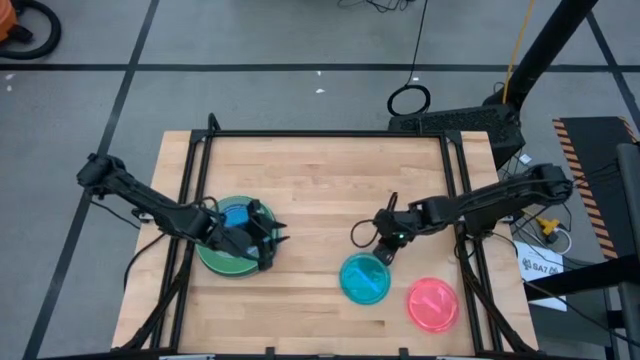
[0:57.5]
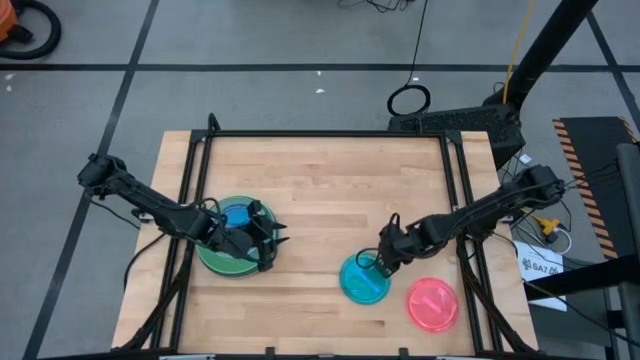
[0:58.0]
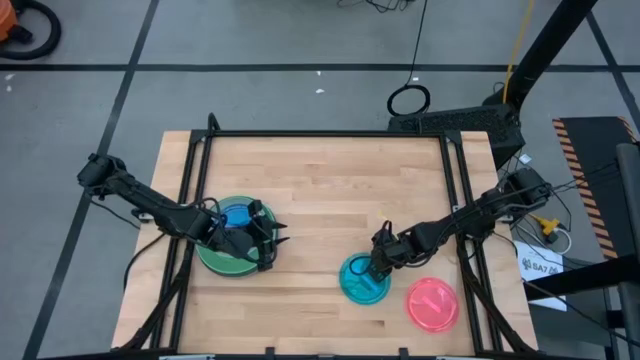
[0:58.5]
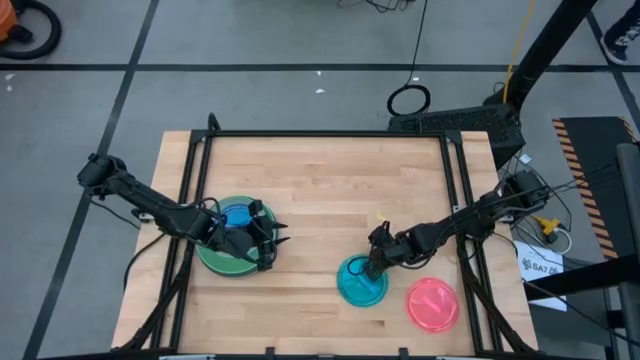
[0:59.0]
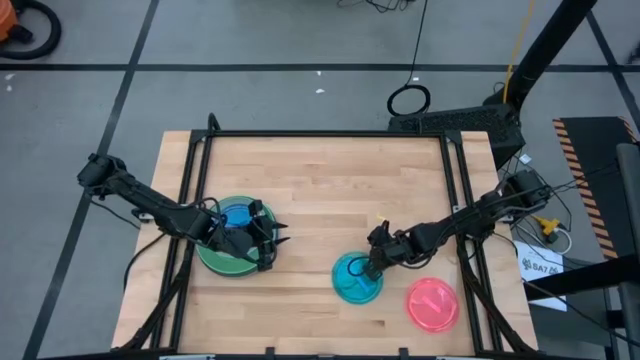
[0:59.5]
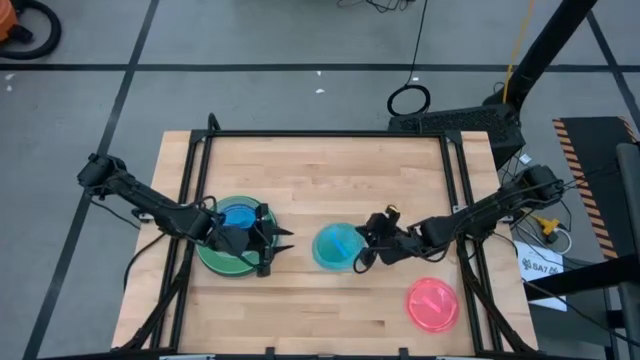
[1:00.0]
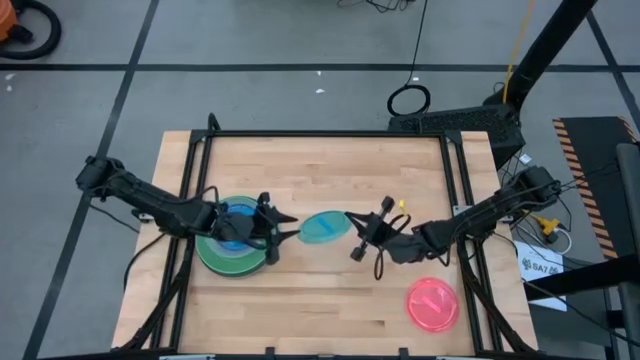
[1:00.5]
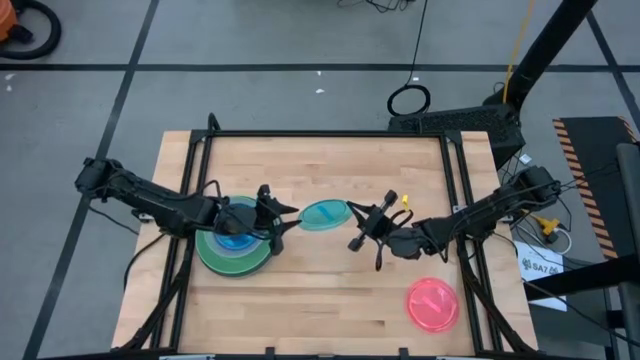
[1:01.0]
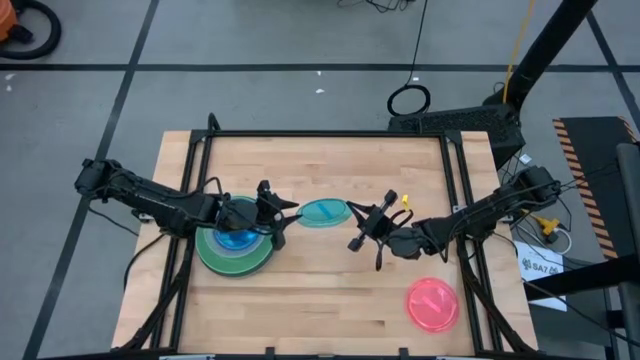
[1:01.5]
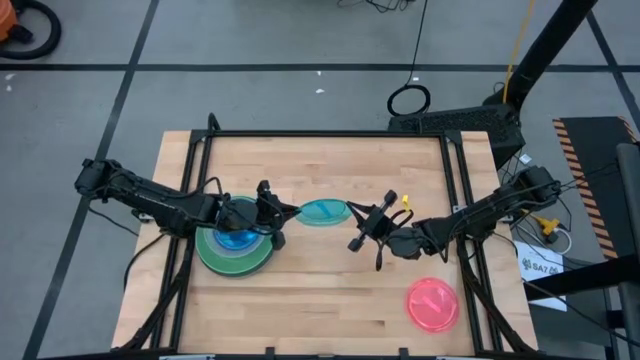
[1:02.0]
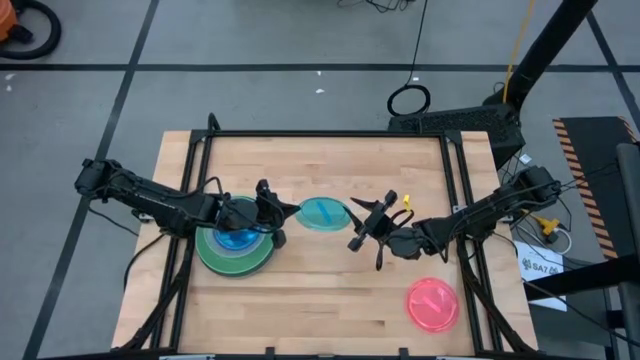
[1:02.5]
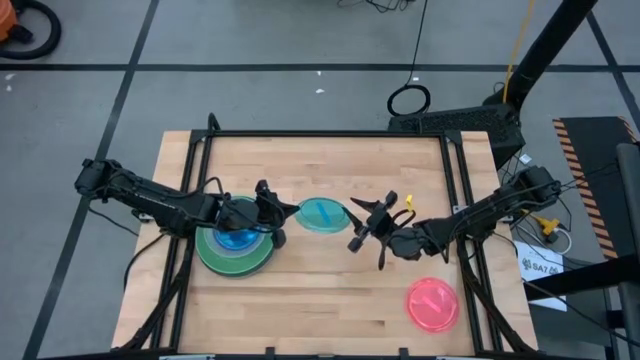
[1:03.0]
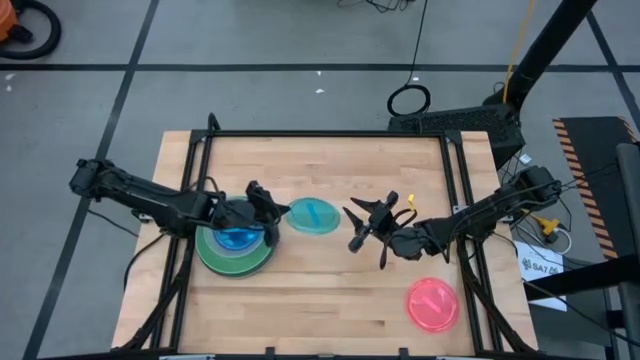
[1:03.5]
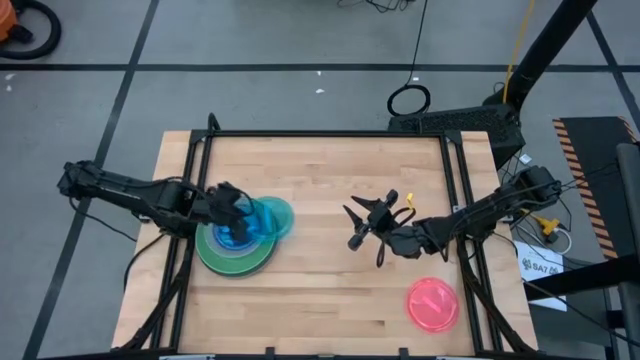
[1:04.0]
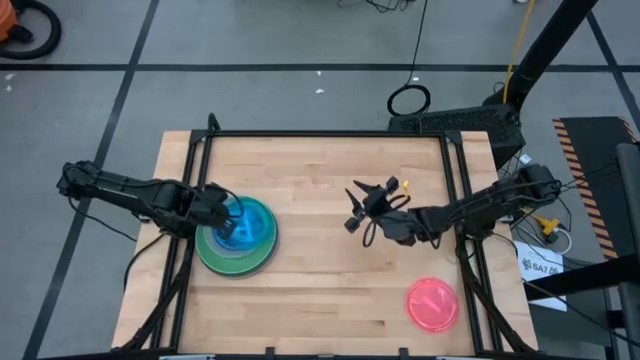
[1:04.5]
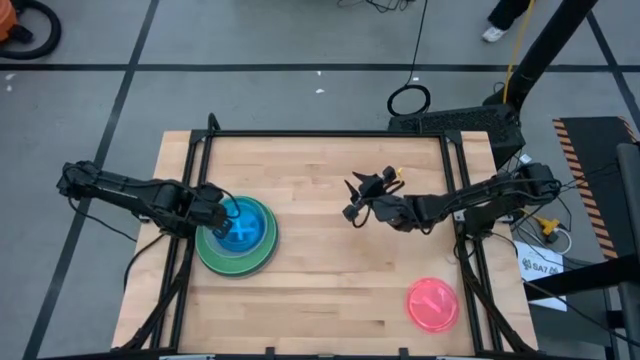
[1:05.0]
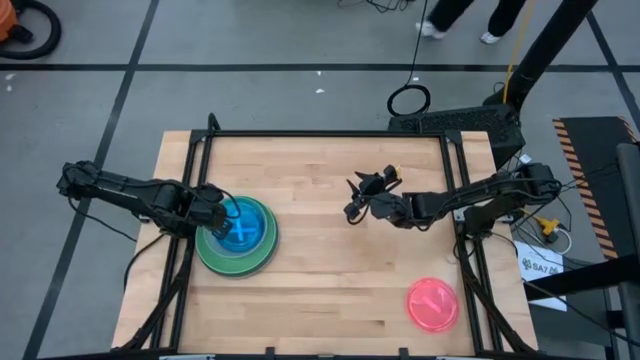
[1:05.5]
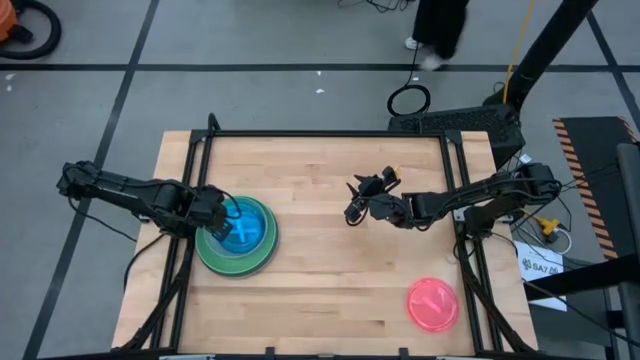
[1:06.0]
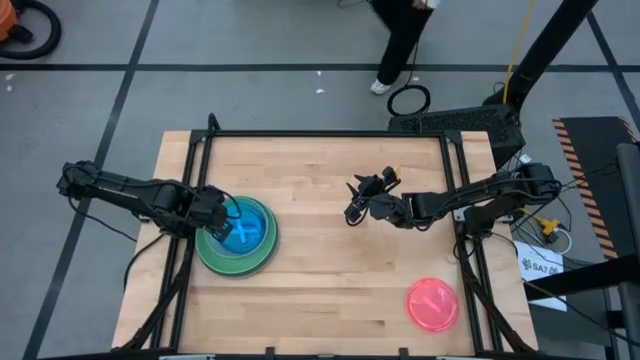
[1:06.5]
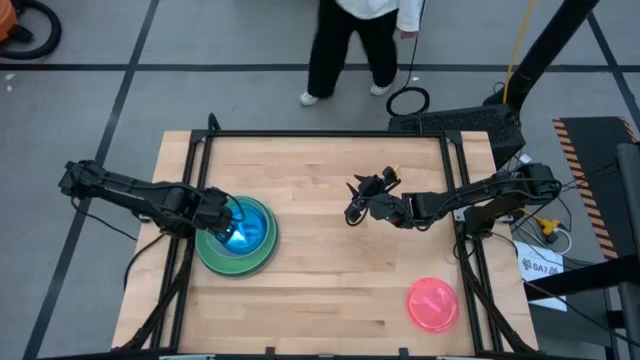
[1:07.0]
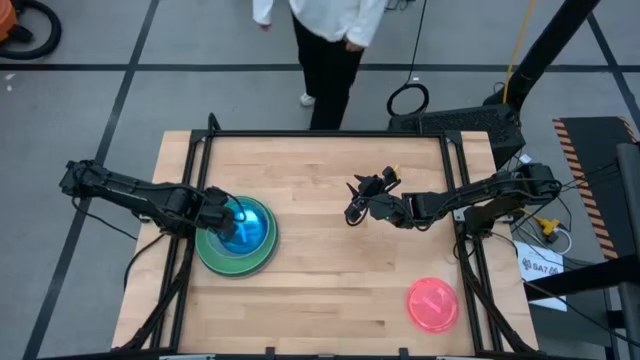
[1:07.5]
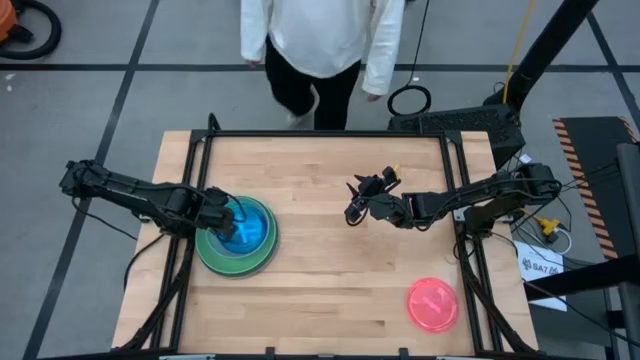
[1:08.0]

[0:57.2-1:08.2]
Task: Stack plastic plates
Stack the light blue plate on top of the light blue plate

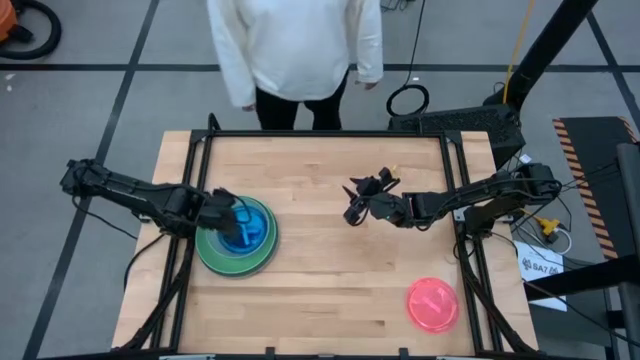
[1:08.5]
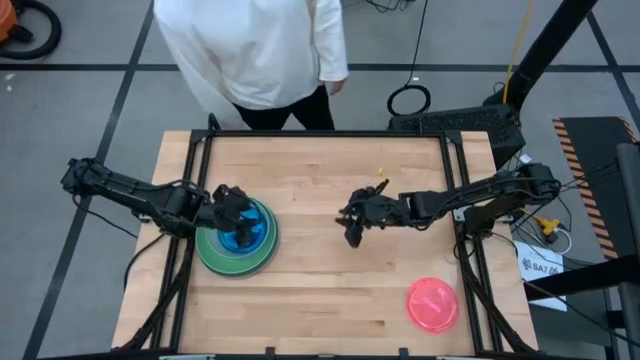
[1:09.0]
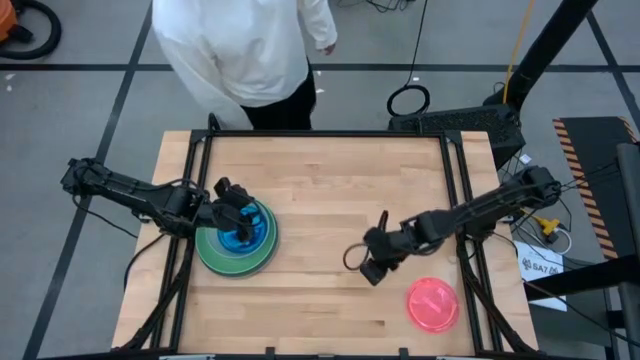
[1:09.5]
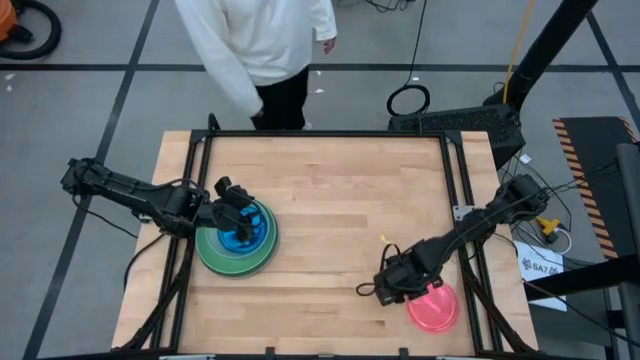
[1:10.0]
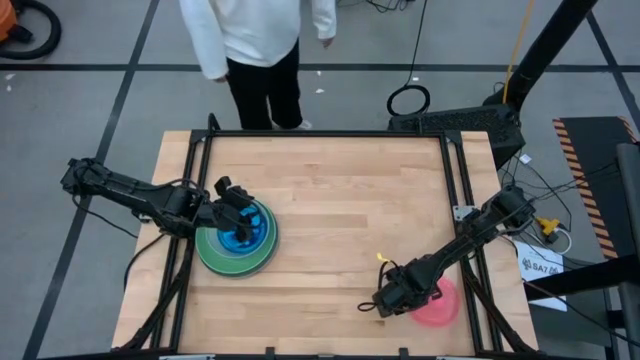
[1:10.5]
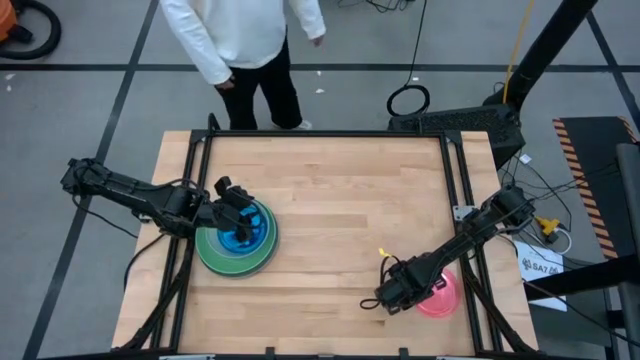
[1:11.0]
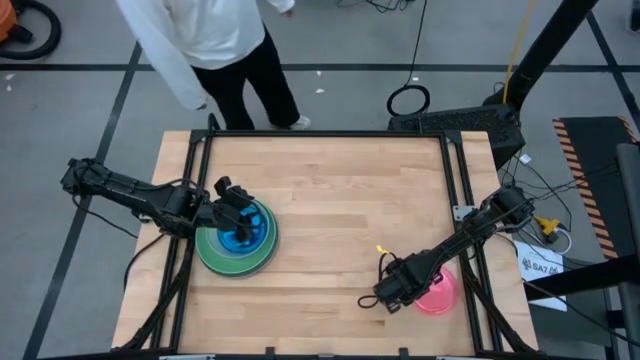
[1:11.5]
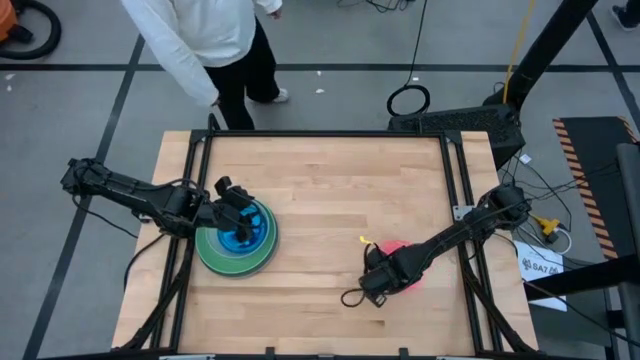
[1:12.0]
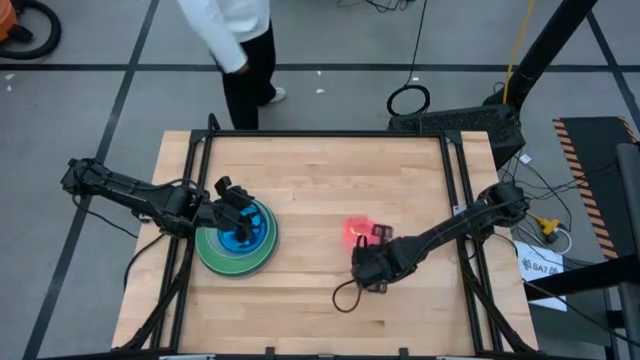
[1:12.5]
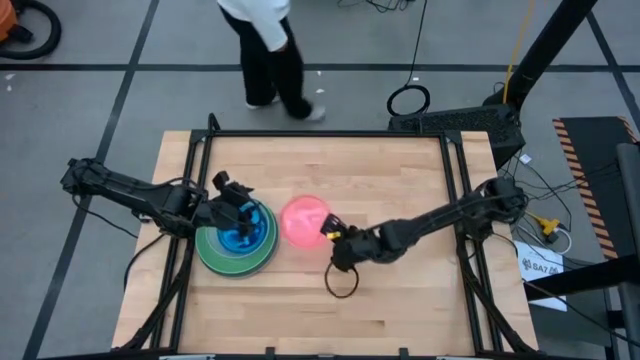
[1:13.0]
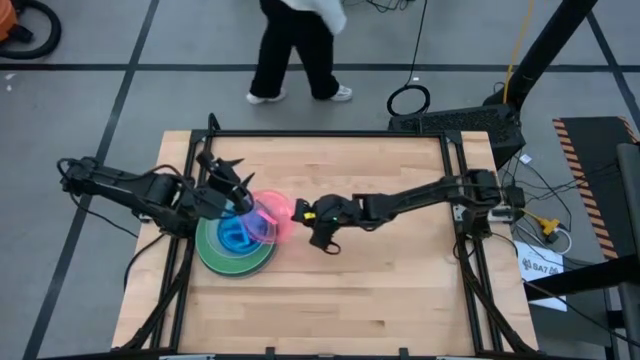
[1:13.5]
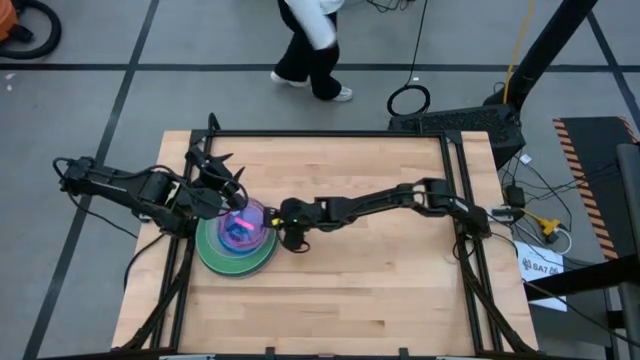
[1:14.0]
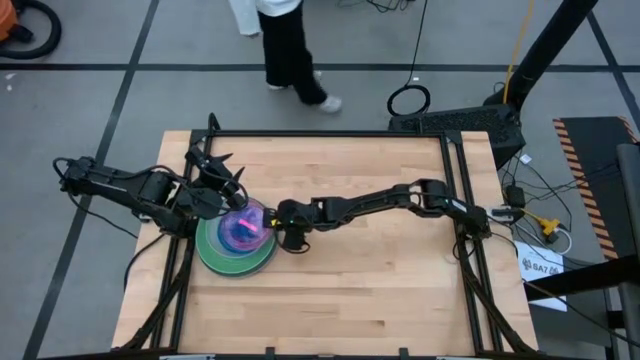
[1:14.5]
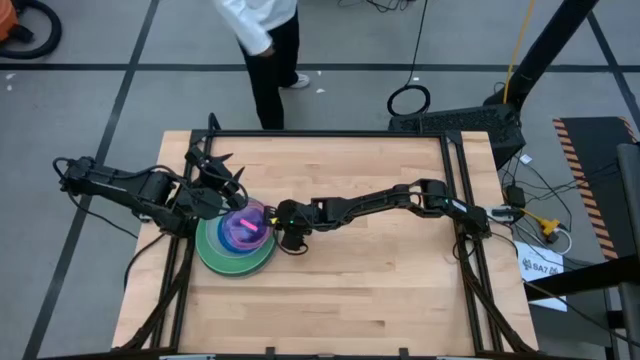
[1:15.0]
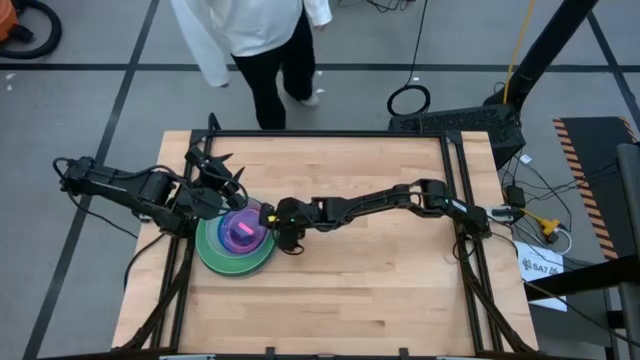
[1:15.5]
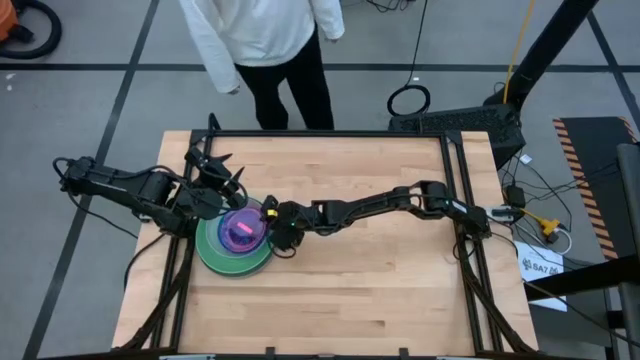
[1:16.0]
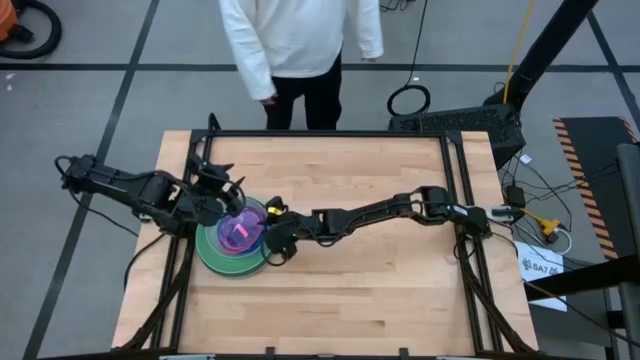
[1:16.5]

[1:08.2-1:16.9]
Stack the light pink plate on top of the light blue plate

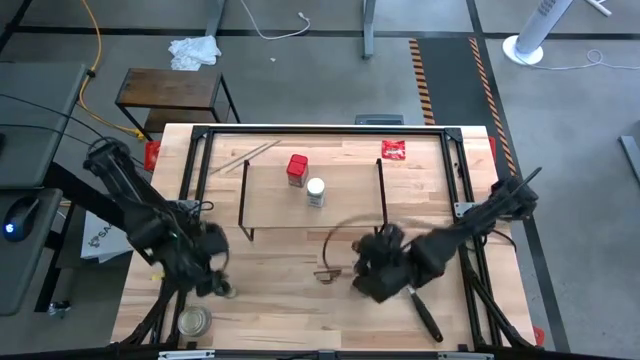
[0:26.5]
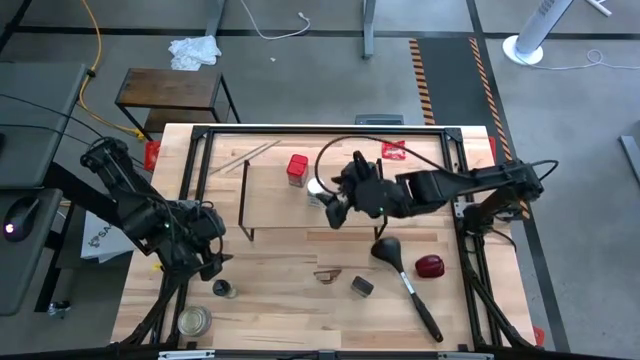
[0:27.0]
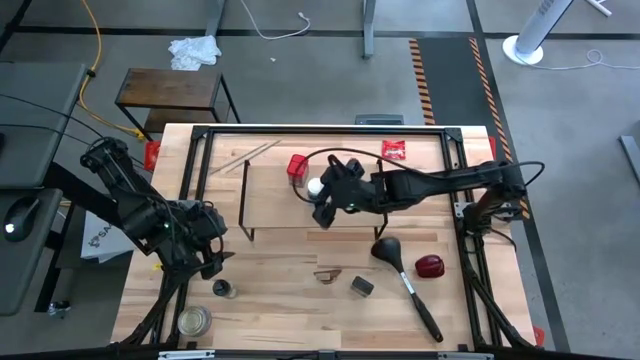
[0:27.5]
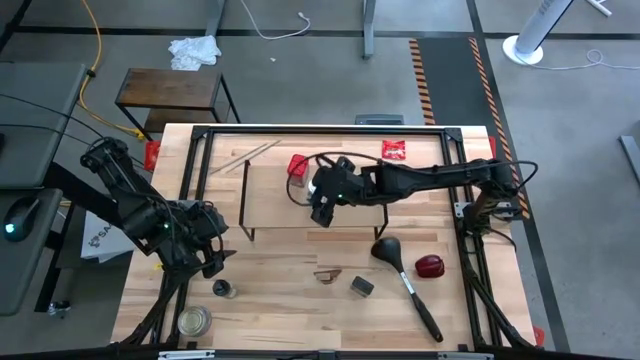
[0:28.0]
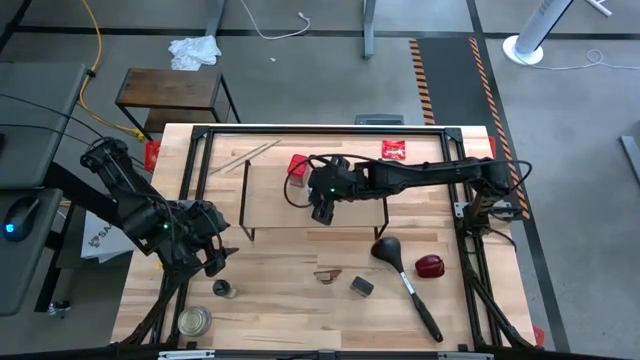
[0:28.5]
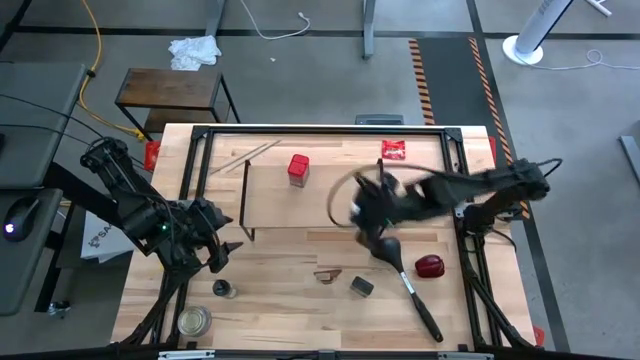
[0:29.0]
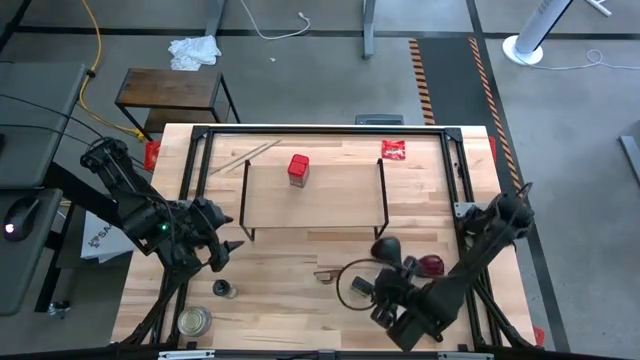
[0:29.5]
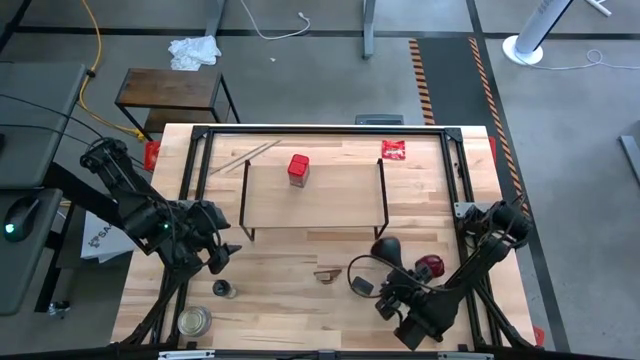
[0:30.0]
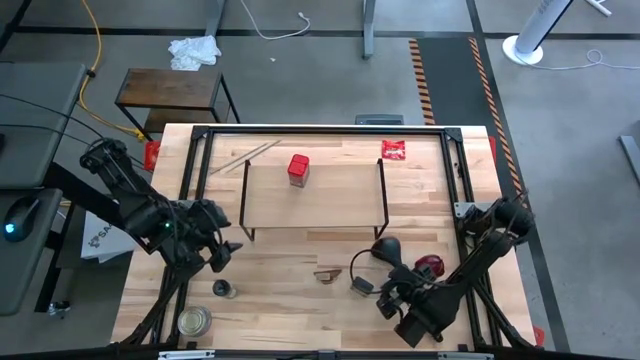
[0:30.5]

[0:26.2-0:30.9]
Task: Shelf spices
Remove the white seasoning bottle from the shelf
